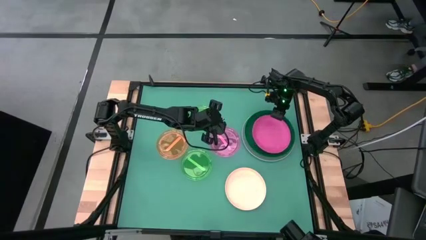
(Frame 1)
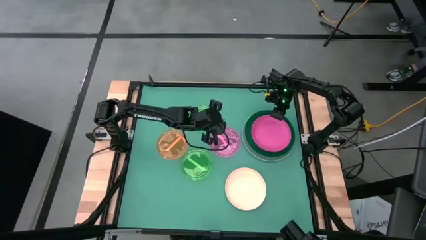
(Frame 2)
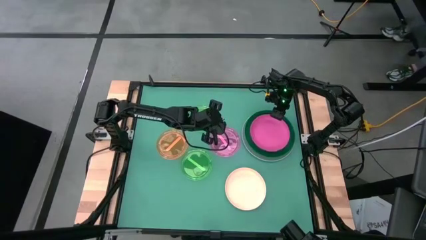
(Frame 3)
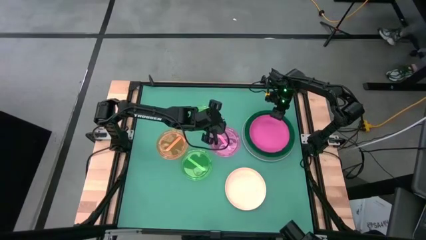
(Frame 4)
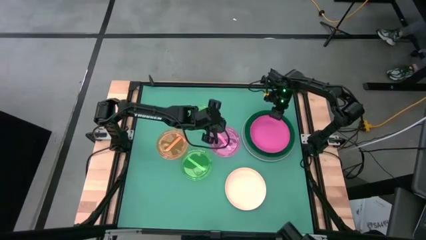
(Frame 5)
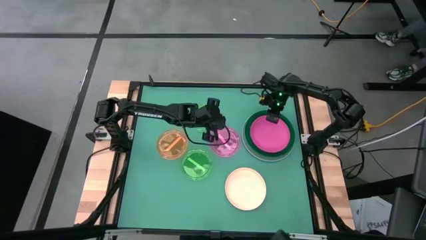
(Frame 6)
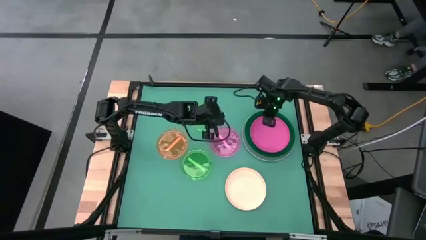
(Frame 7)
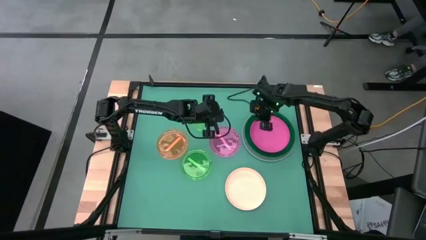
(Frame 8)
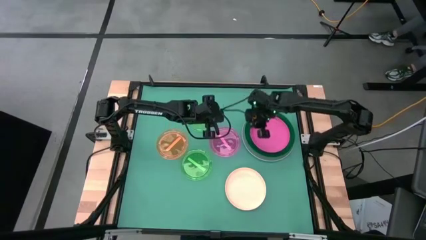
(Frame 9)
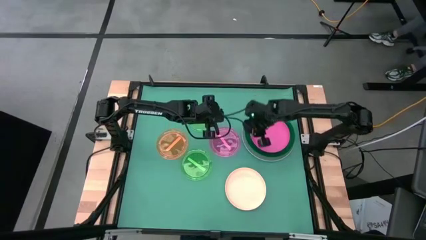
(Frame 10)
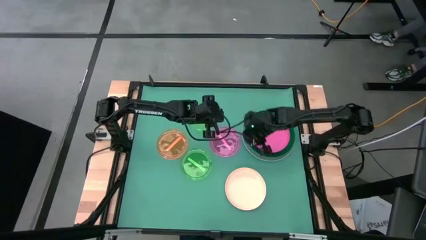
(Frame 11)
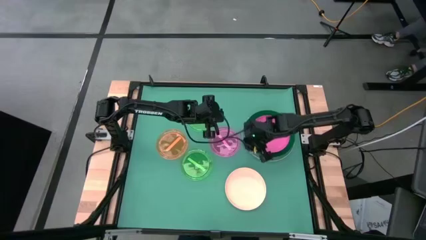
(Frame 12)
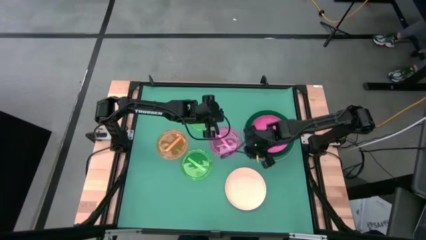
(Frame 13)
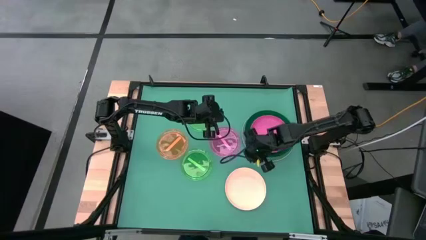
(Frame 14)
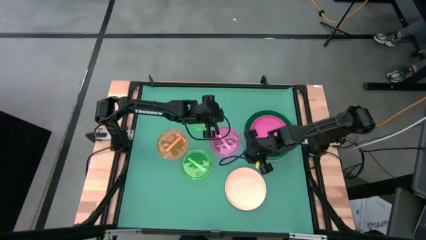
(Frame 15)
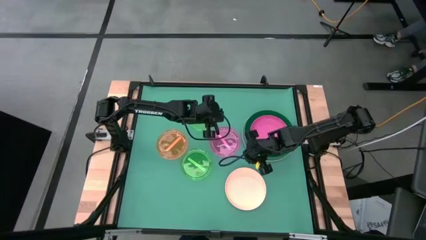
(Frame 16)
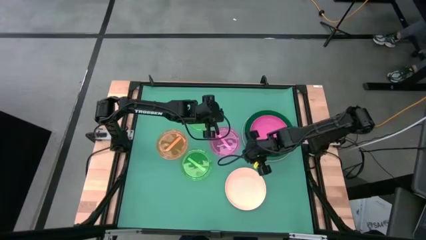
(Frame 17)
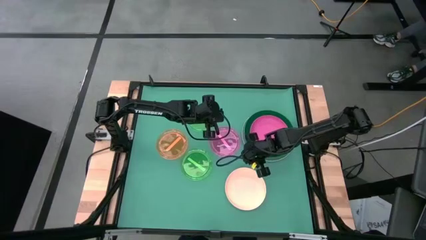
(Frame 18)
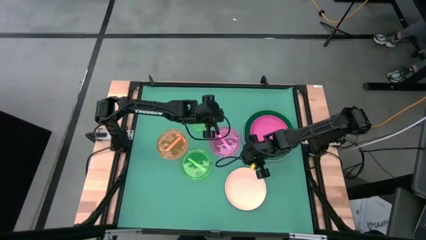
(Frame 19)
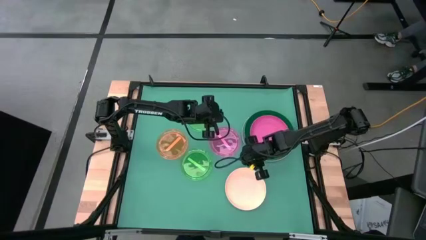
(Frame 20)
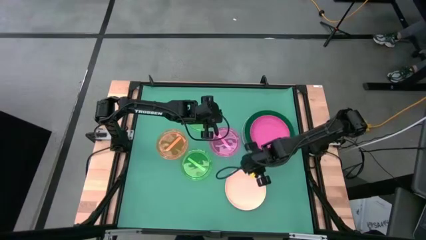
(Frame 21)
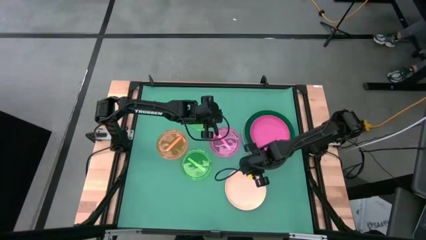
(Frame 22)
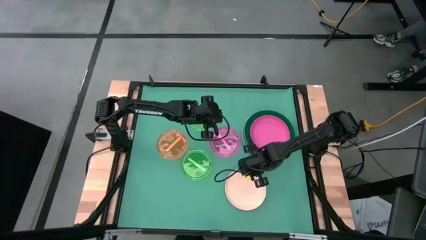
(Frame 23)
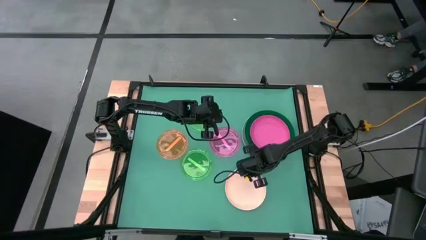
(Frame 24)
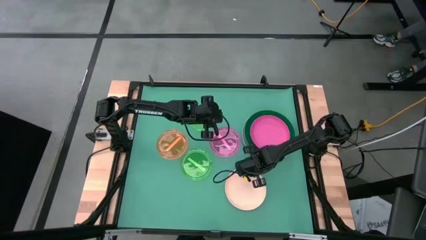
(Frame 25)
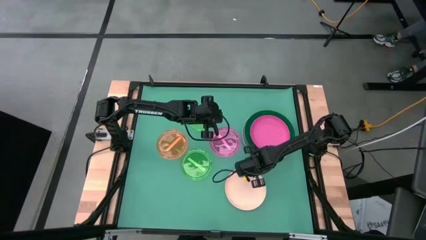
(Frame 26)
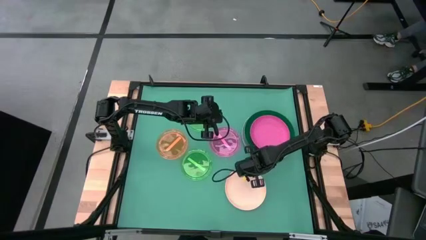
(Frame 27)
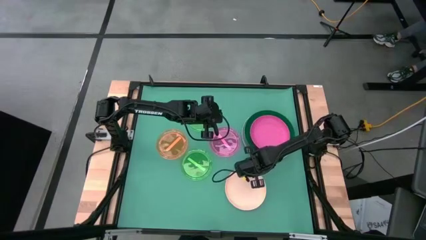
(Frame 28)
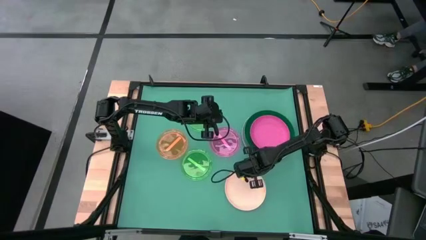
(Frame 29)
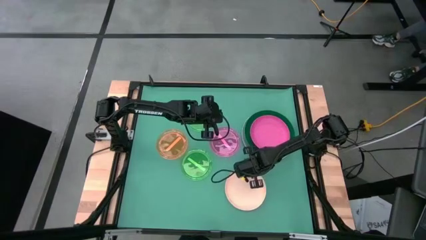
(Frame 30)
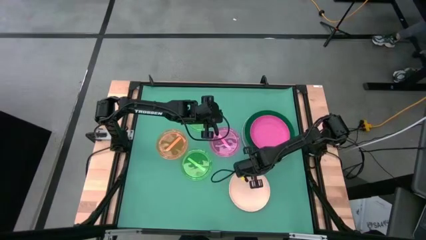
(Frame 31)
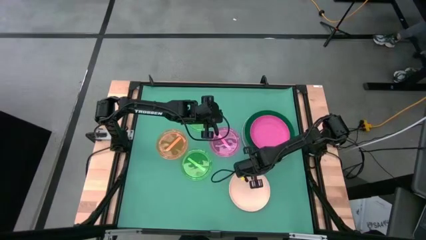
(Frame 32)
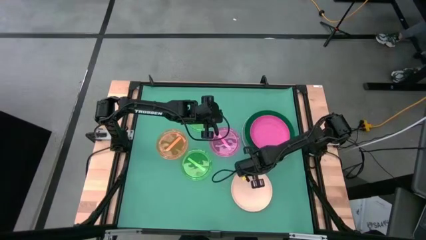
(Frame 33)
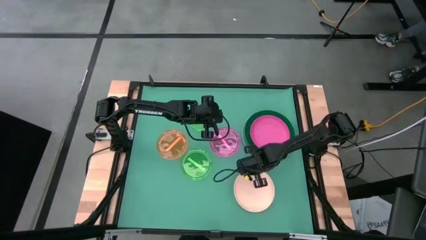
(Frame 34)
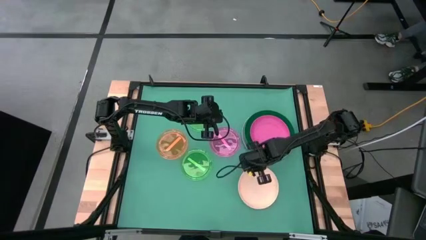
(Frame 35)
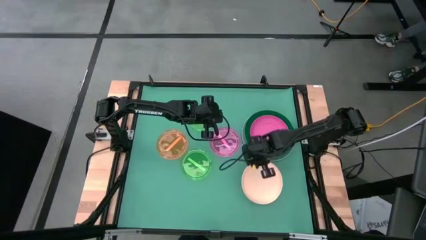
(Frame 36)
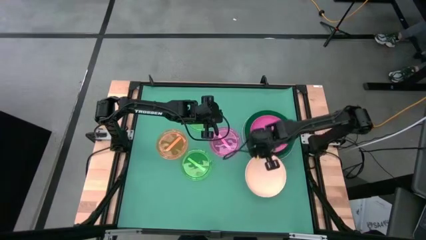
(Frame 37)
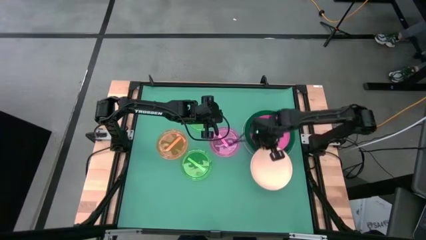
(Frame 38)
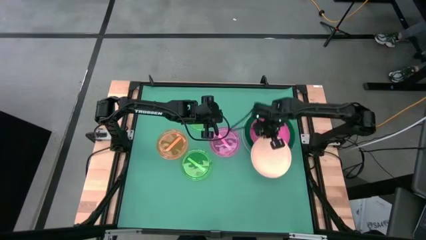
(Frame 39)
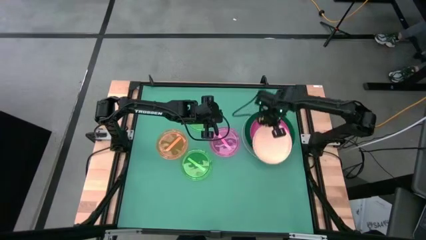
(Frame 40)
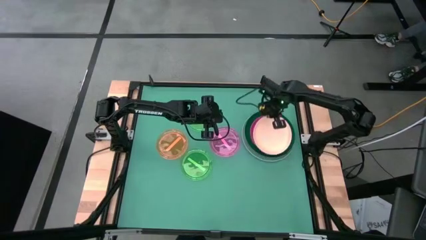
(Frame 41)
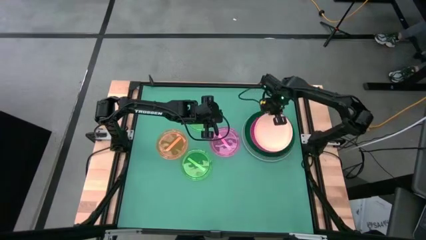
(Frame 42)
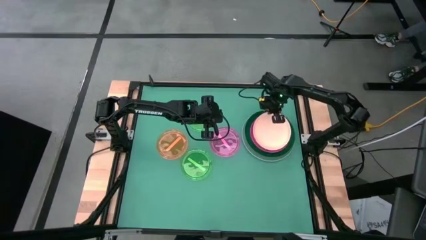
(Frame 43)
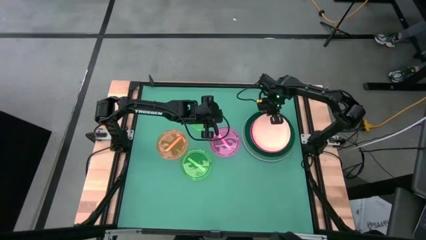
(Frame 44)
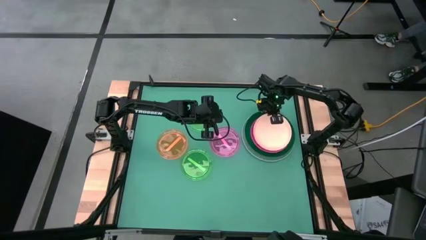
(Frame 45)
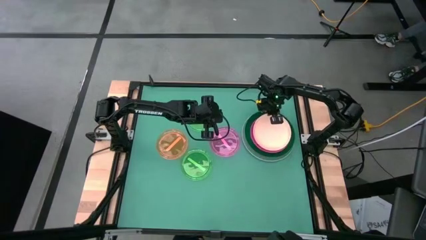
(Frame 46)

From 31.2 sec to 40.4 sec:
Task: Stack plastic plates
Stack the white plate on top of the pink plate

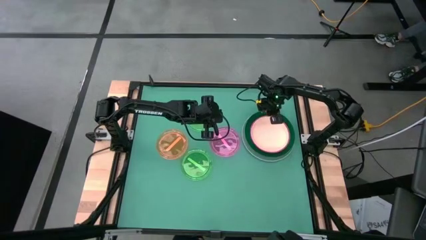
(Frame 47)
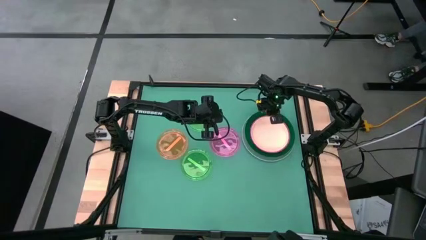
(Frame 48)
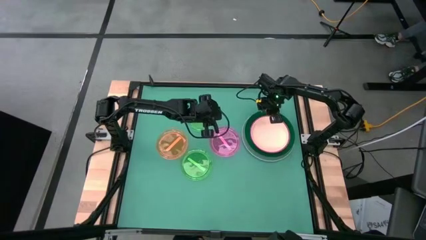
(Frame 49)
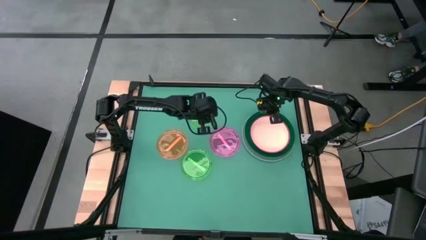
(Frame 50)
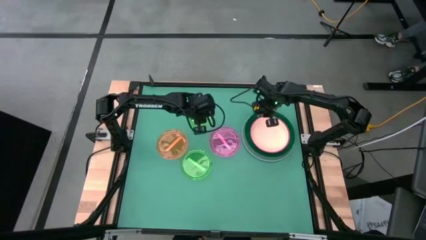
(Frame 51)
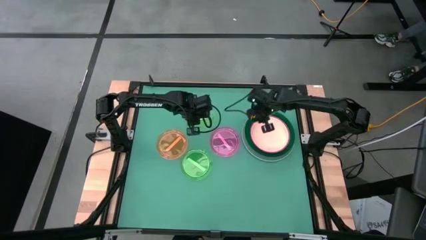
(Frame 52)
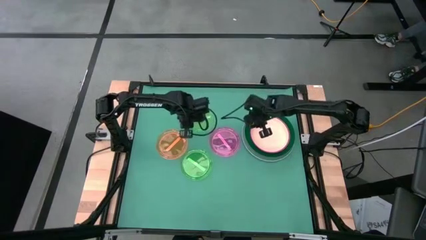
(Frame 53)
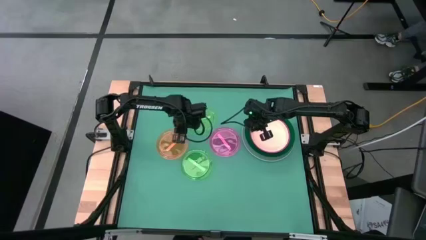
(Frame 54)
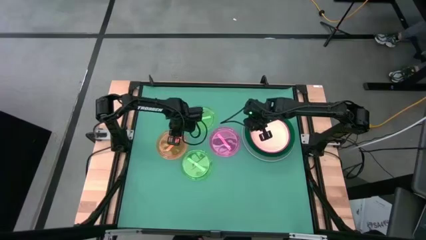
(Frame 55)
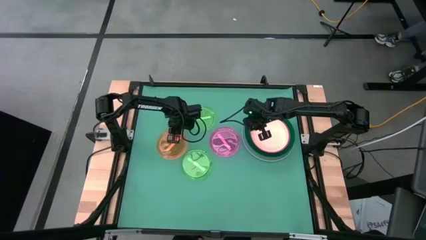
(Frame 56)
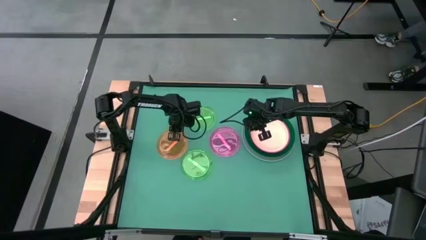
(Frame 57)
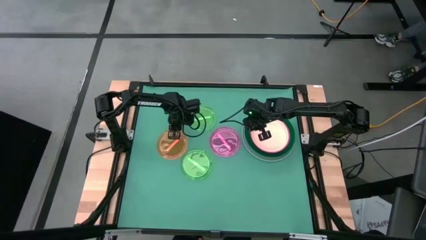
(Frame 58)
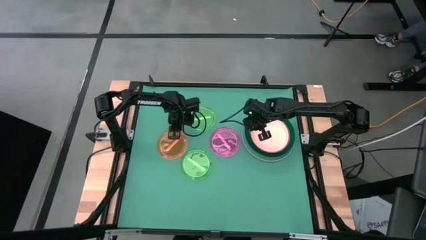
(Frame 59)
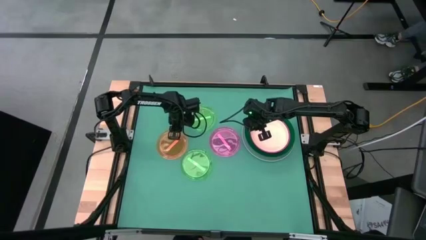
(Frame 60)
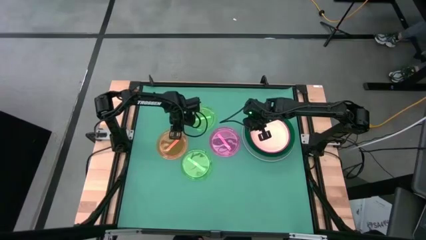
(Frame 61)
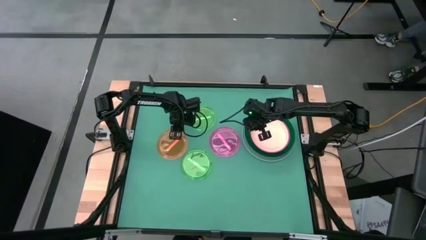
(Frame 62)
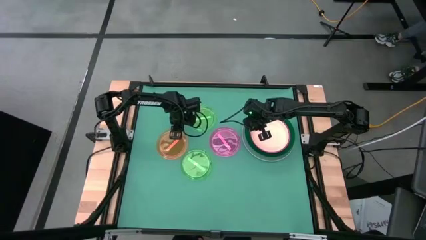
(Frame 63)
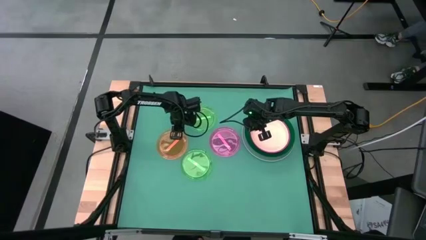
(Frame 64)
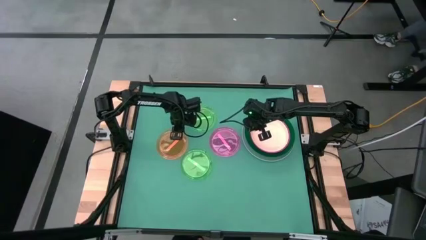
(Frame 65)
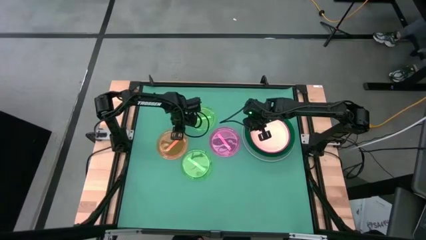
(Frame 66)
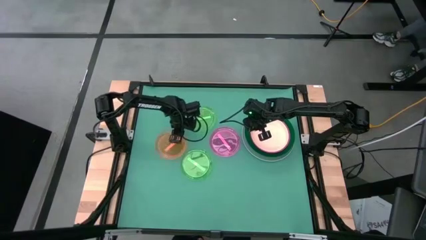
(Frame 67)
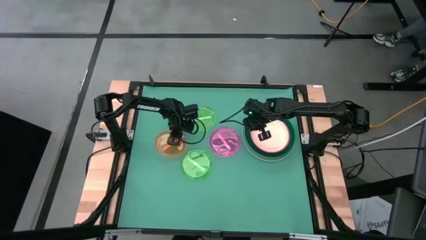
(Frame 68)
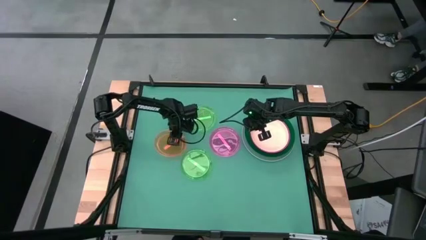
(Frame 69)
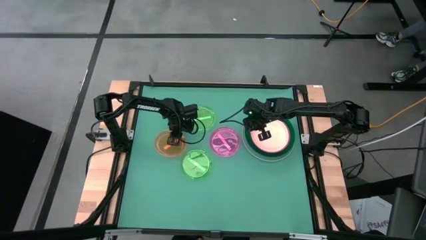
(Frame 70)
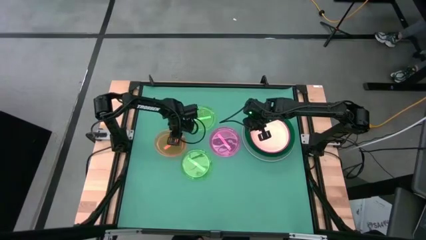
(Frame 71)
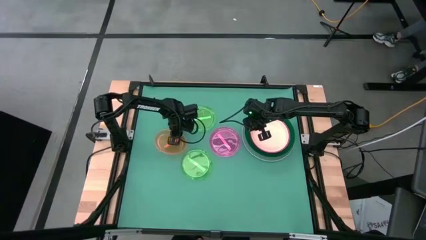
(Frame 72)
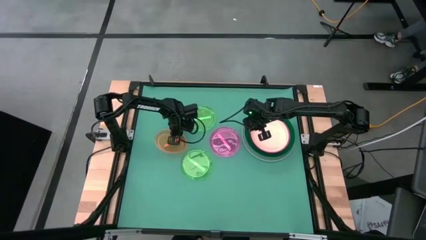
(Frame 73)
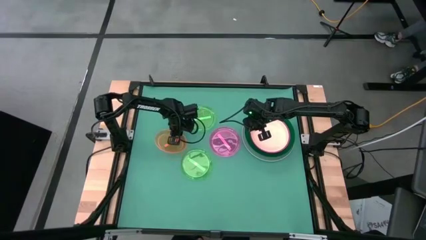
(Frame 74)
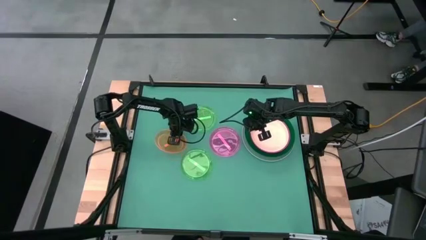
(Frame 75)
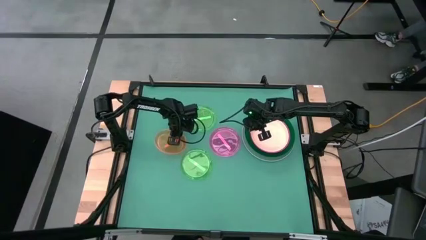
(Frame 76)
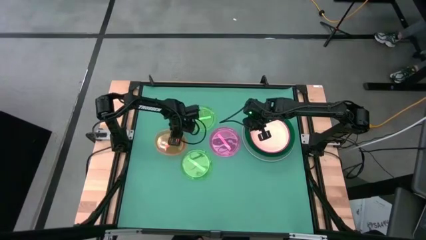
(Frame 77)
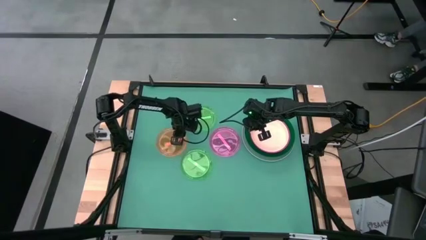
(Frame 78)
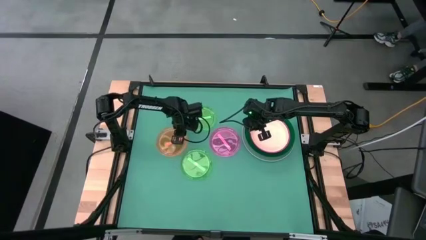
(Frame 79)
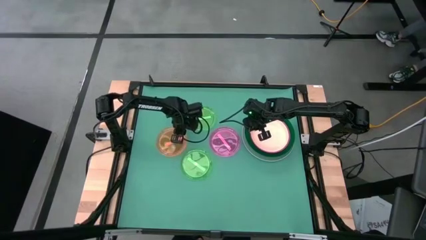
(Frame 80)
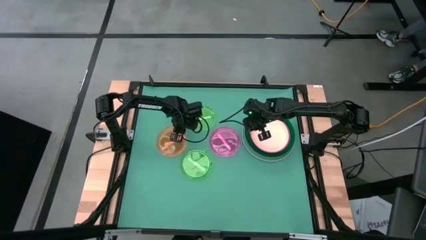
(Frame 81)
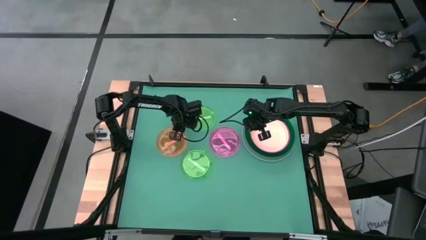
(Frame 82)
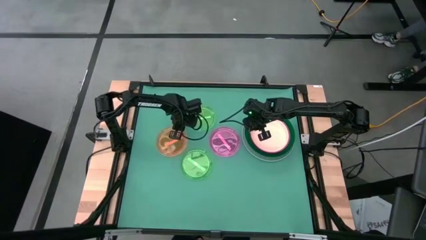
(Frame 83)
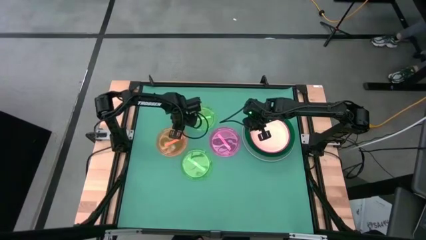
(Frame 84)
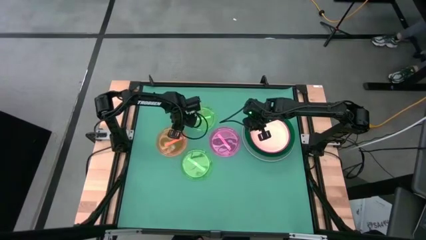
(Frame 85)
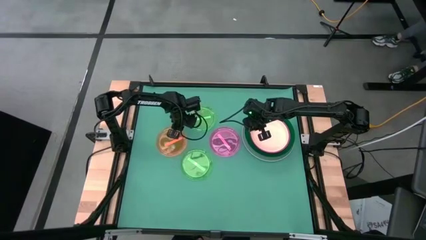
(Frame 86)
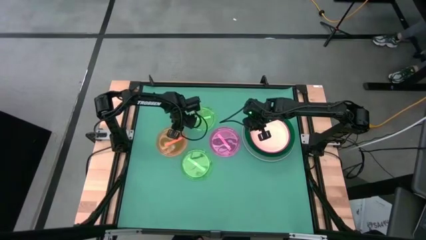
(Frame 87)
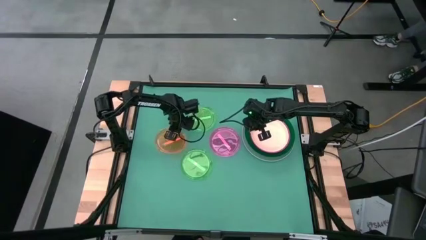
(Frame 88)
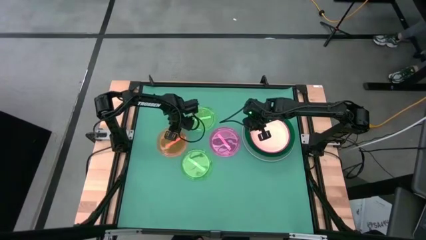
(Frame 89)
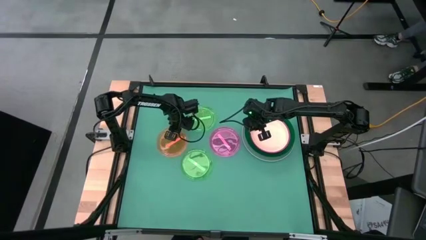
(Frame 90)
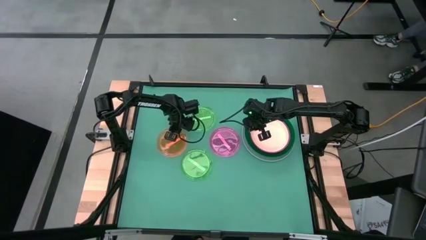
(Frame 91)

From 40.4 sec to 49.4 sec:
Stack the orange plate on top of the white plate
